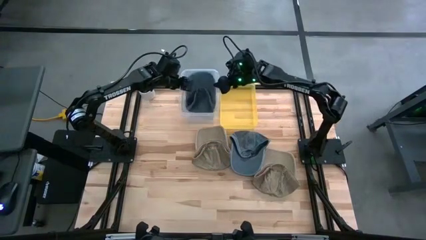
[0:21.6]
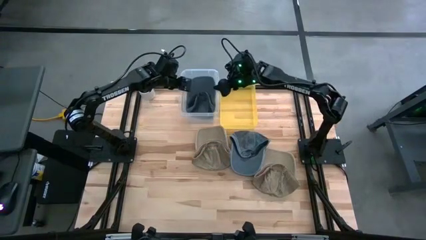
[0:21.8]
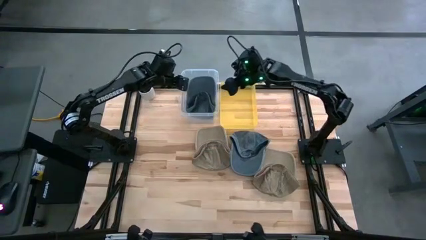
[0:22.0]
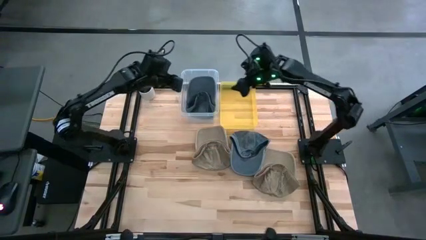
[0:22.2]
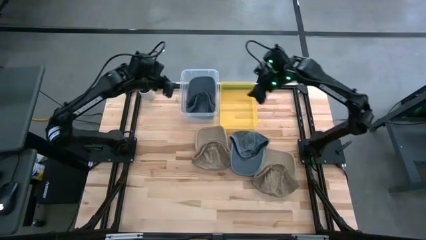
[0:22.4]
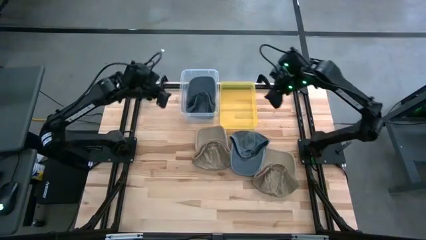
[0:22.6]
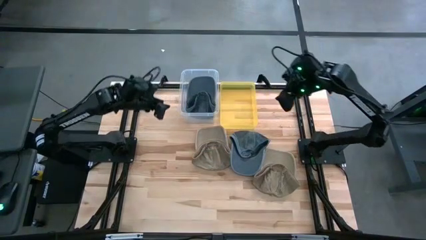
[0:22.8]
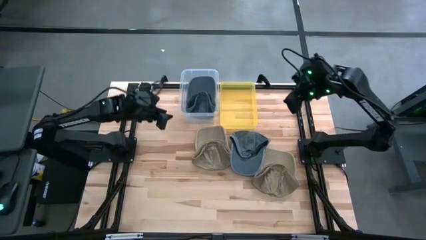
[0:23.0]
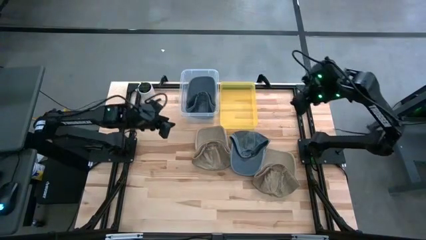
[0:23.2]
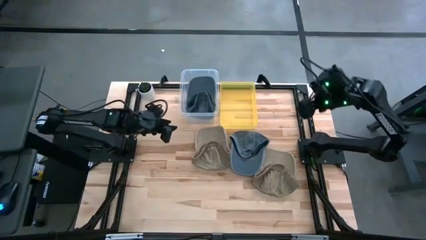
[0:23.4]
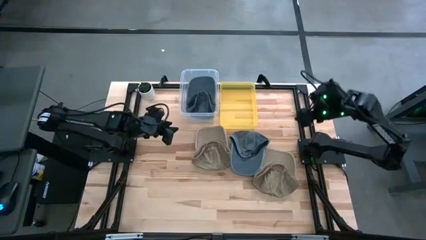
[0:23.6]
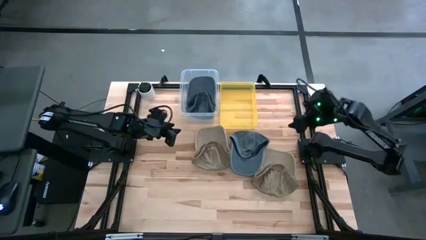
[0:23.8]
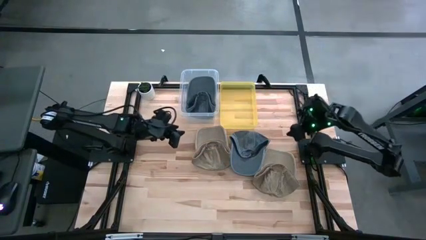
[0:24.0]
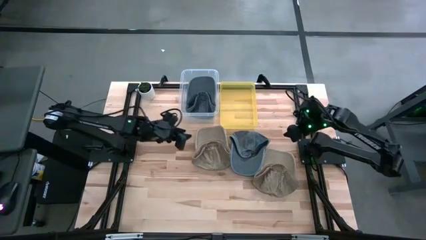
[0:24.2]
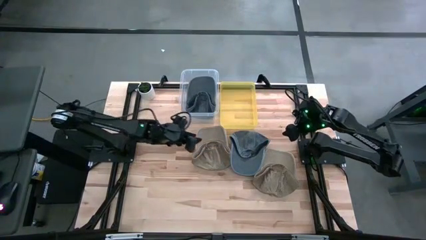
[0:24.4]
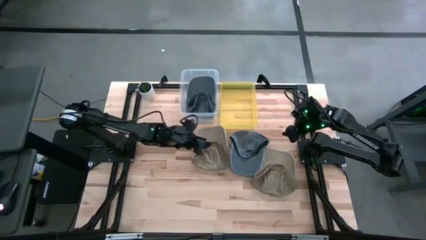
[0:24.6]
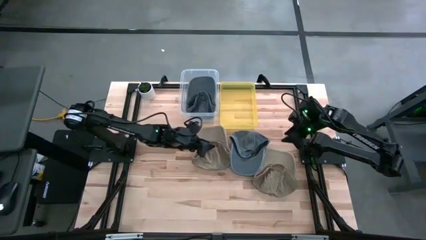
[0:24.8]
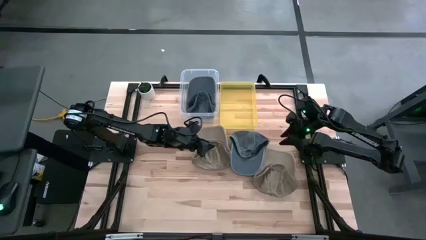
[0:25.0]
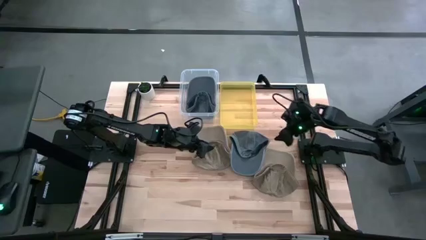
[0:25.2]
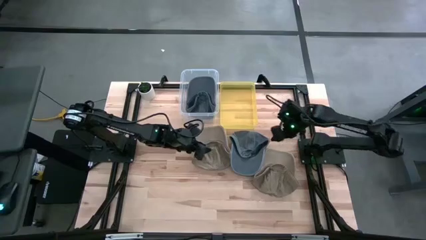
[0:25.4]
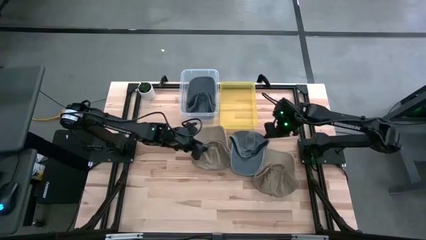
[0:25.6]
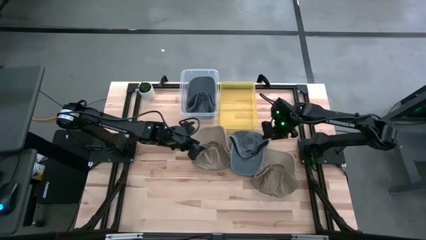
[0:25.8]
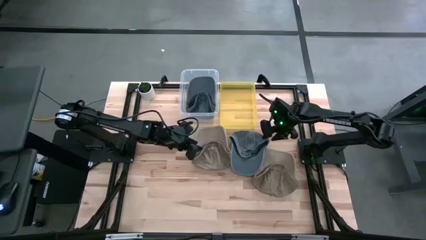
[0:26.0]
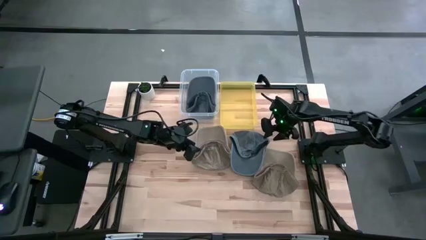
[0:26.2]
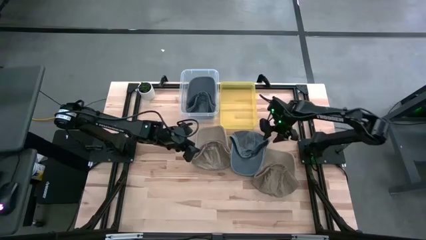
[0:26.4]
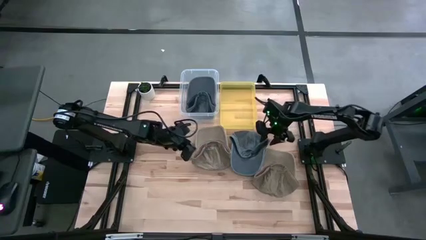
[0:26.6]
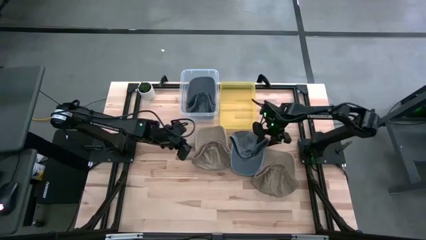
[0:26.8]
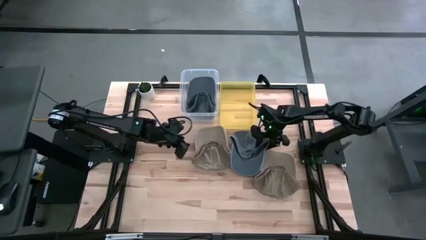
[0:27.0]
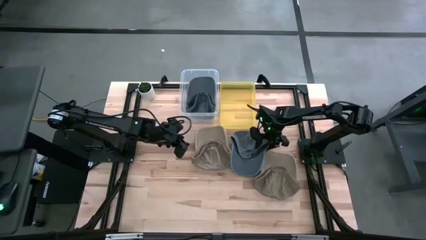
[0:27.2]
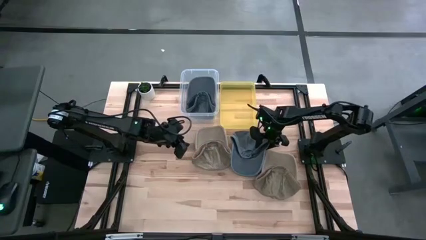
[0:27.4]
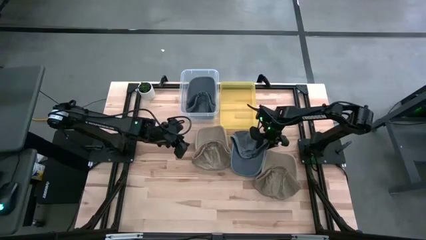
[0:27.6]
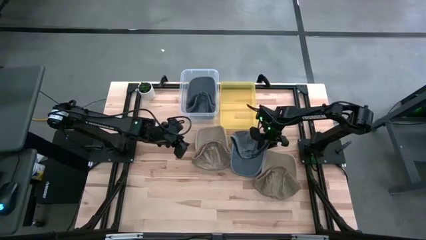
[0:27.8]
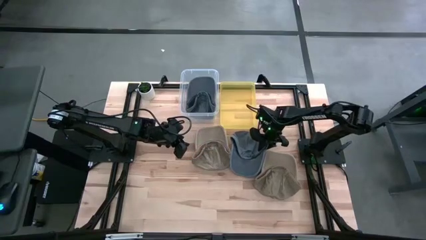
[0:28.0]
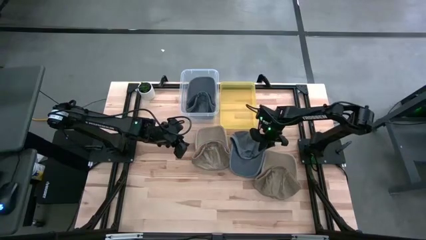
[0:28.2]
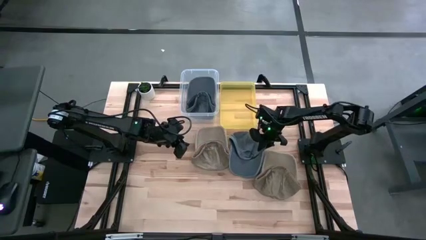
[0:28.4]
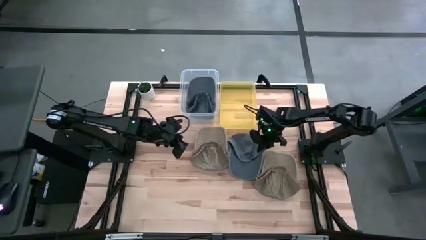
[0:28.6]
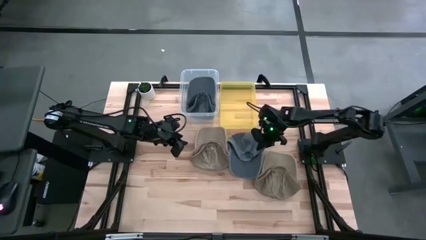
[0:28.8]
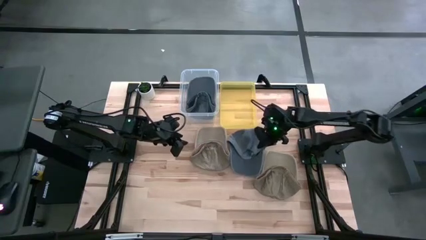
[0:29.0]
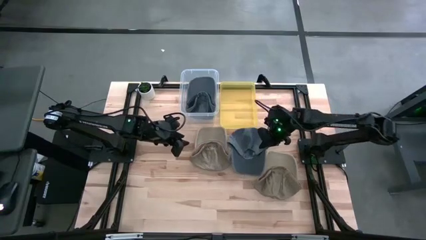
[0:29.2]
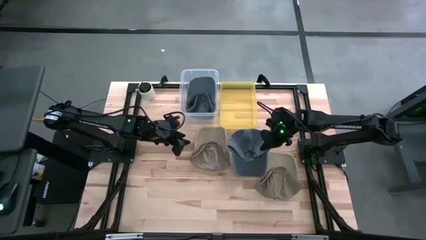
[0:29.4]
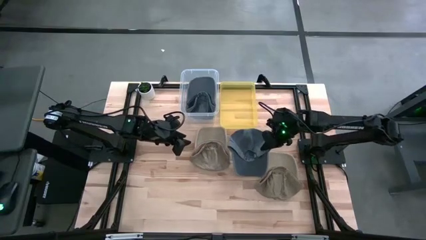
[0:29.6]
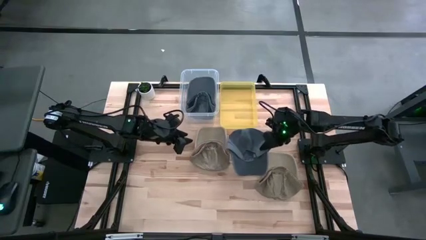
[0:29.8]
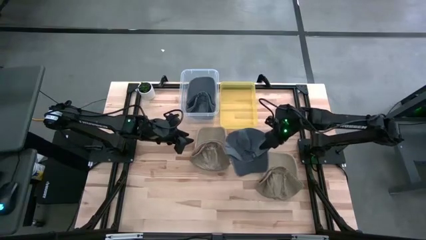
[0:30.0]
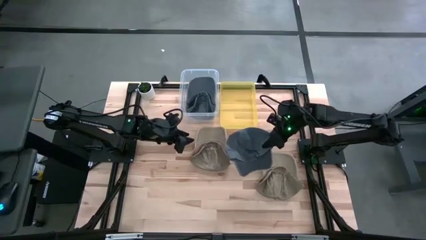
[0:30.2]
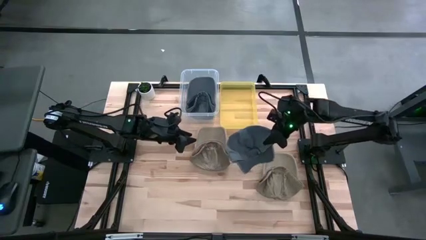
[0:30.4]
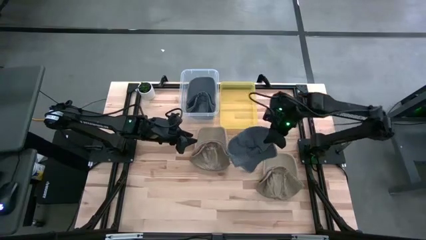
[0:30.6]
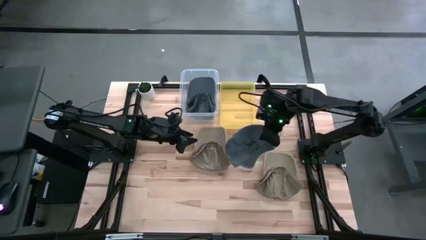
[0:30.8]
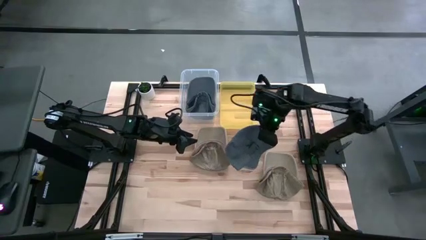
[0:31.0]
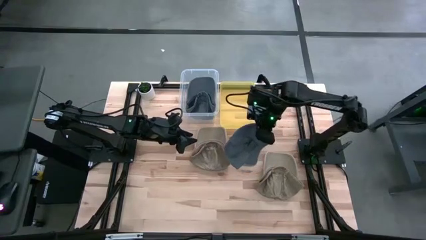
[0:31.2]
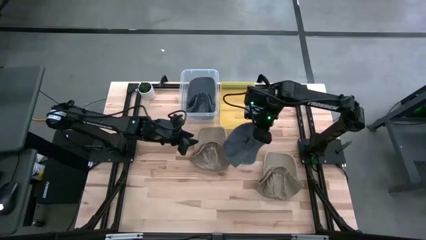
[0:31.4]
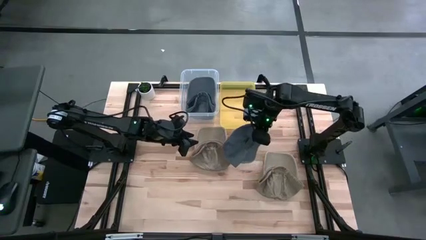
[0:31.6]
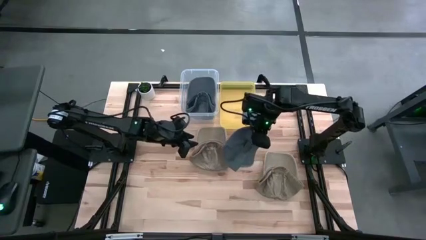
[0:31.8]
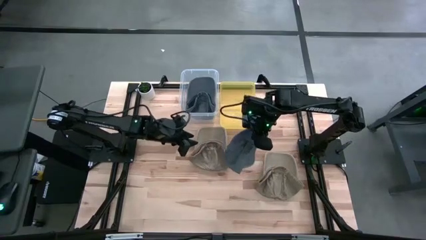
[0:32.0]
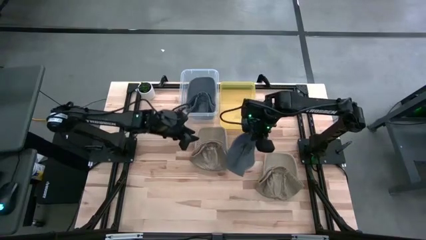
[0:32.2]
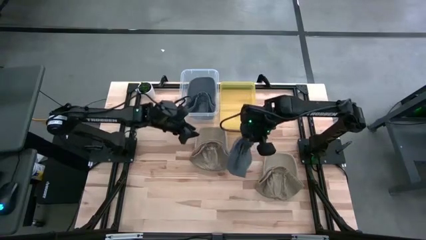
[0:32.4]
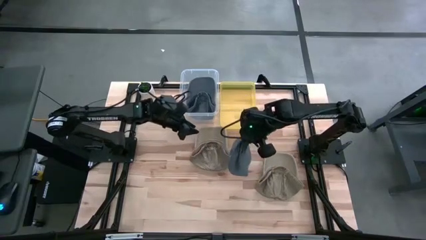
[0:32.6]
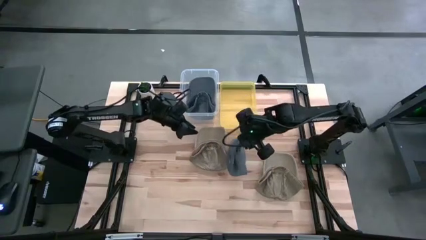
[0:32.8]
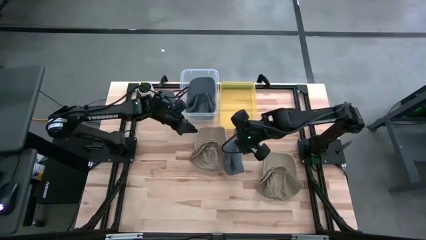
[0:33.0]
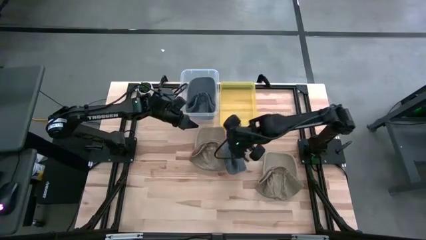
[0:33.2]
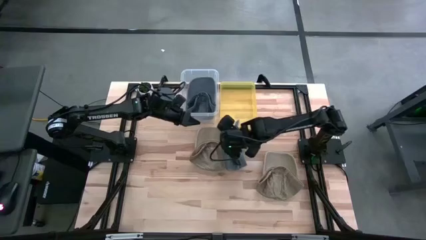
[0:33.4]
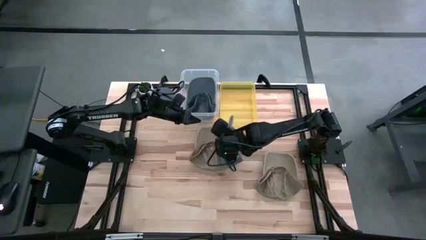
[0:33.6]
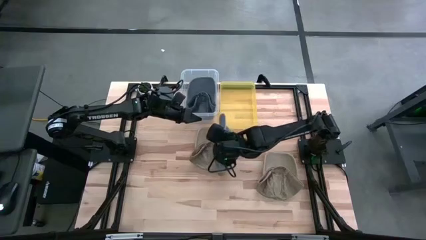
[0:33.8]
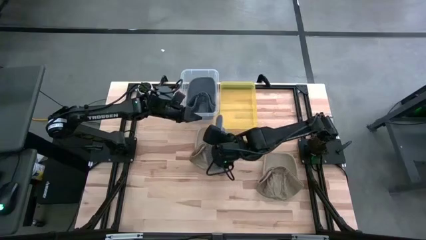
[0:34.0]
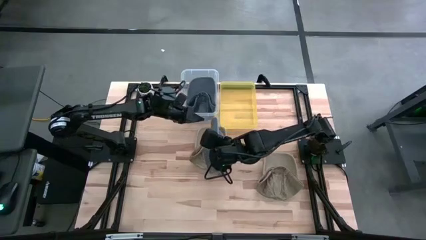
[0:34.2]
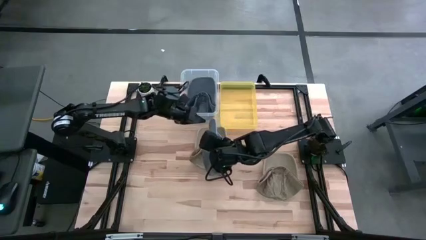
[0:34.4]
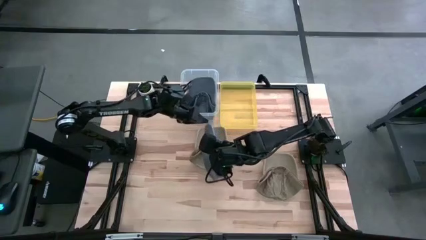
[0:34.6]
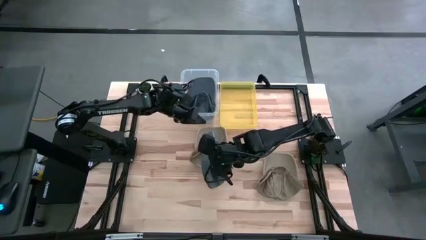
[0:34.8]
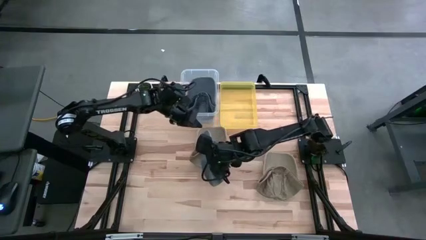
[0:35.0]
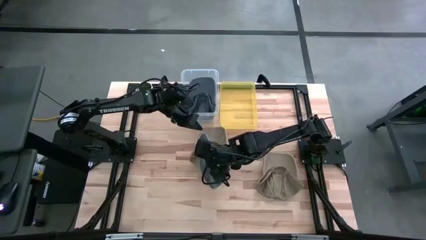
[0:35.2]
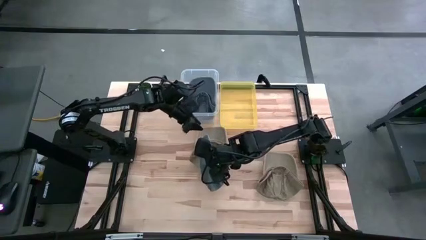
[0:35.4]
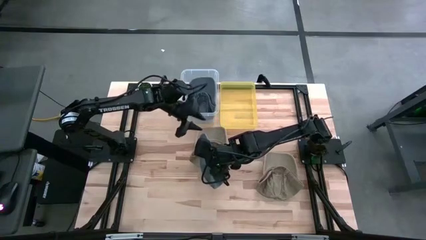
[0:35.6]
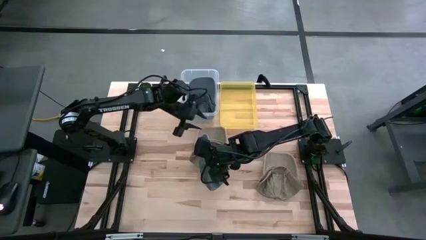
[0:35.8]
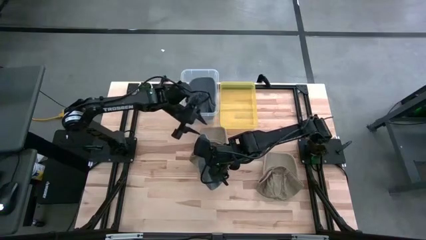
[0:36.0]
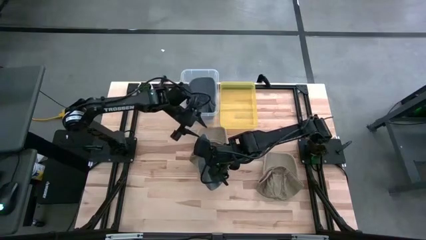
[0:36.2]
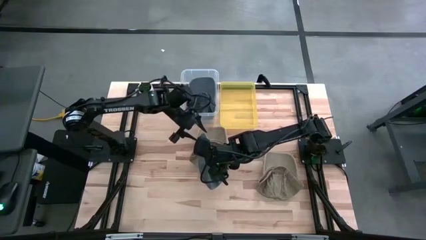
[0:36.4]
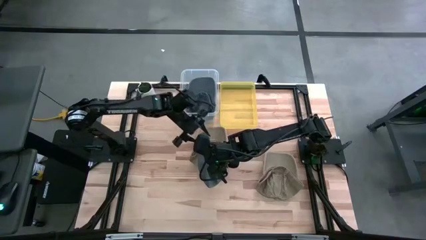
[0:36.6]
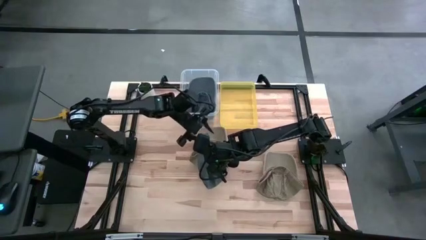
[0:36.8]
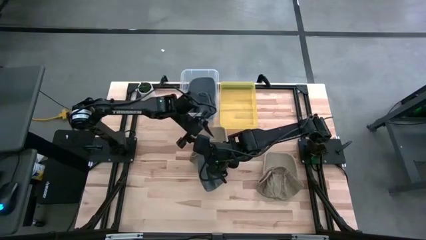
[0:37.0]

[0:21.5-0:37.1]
Task: Pick & Place hat
Put the black cap into the transparent bin
